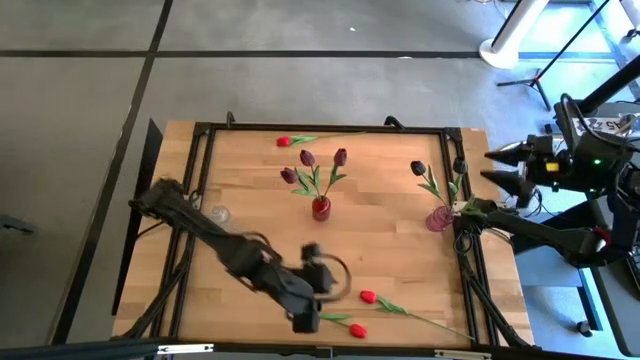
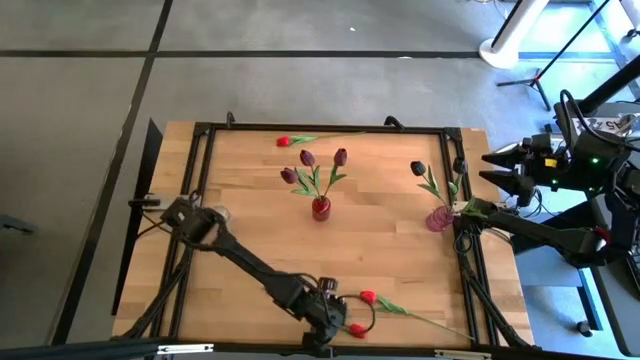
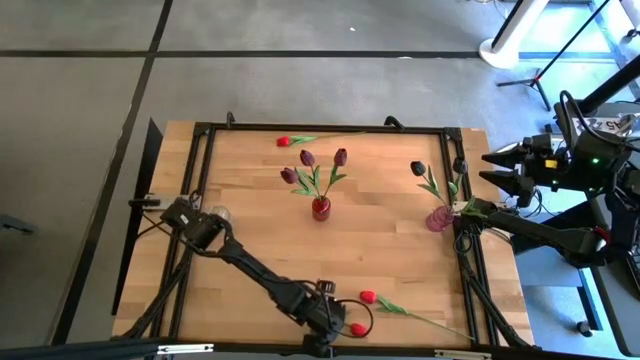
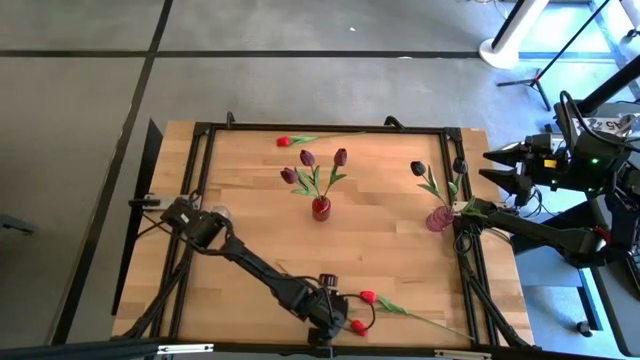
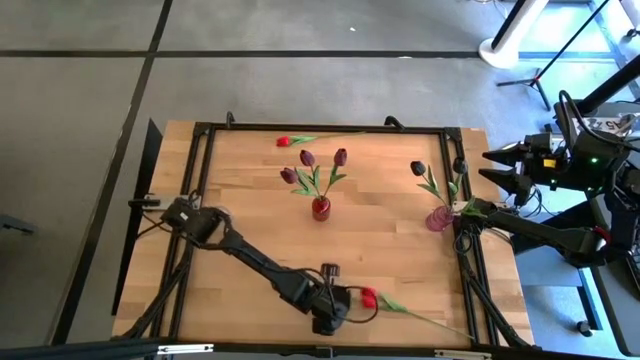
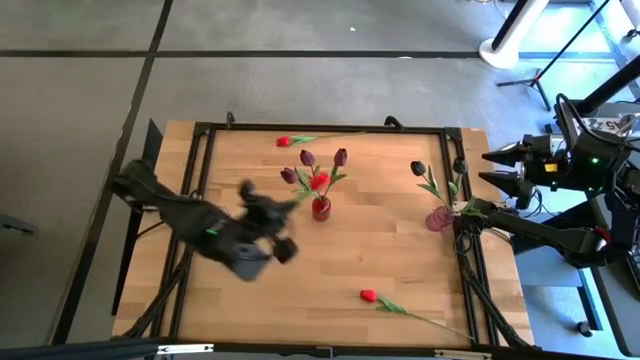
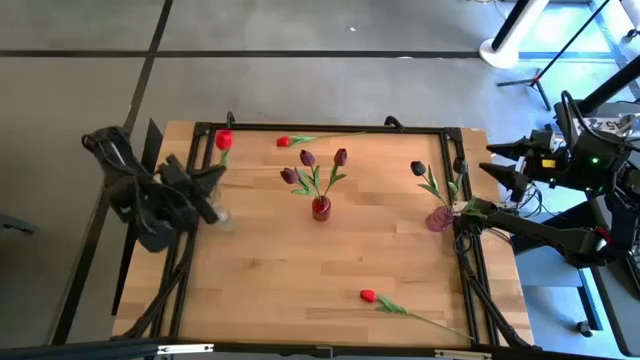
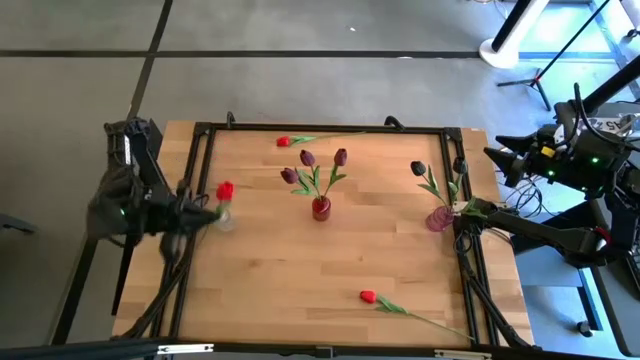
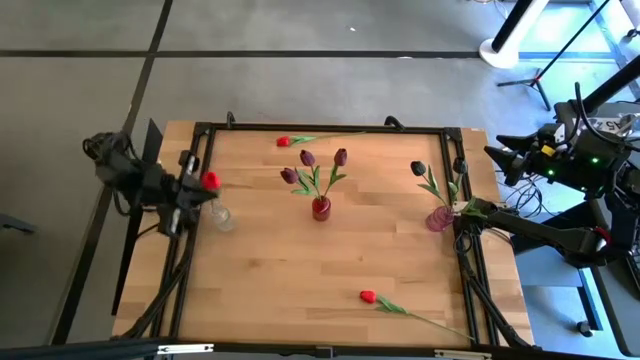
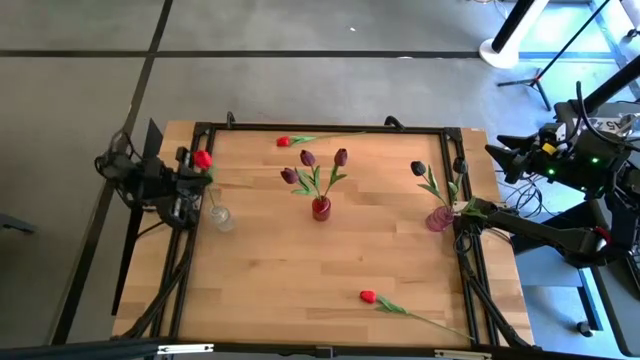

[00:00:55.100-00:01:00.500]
Task: Sort flowers into vase by color
Put the bottom left red tulip into the transparent vase

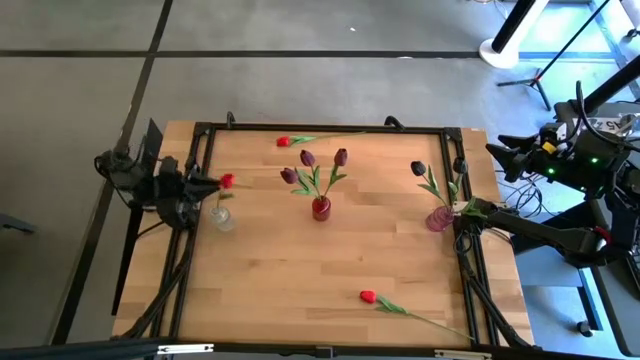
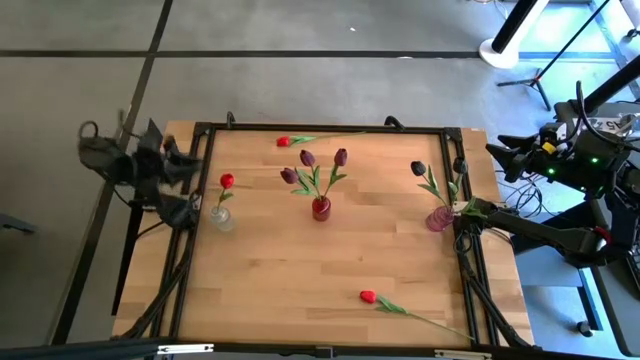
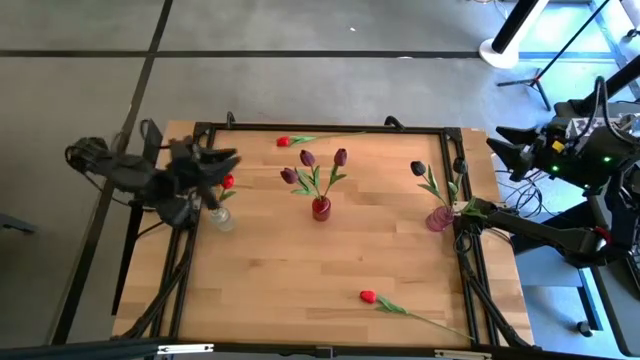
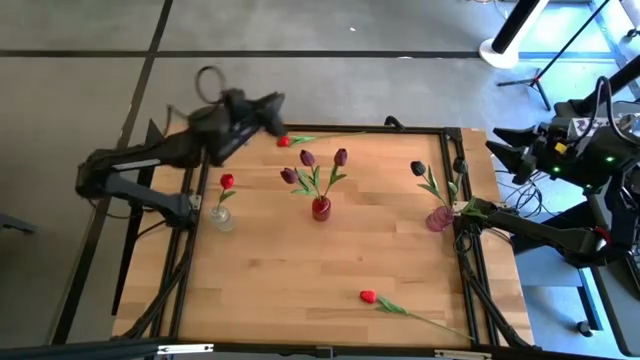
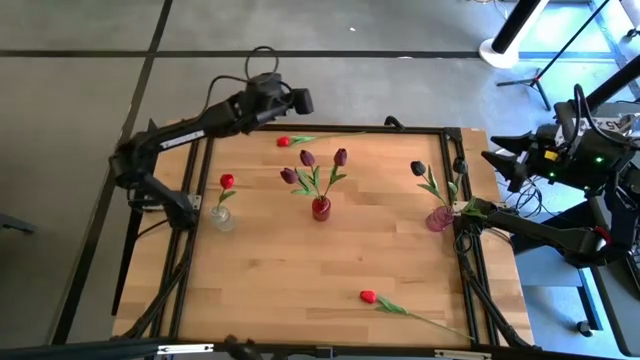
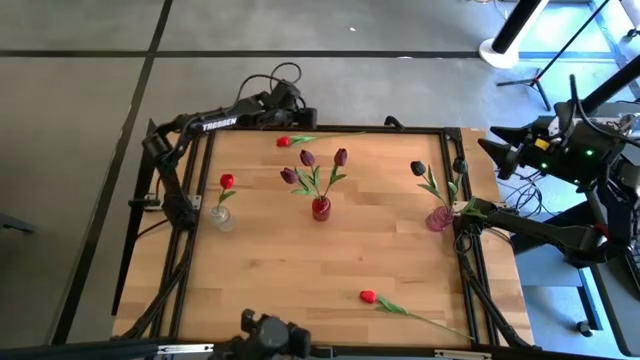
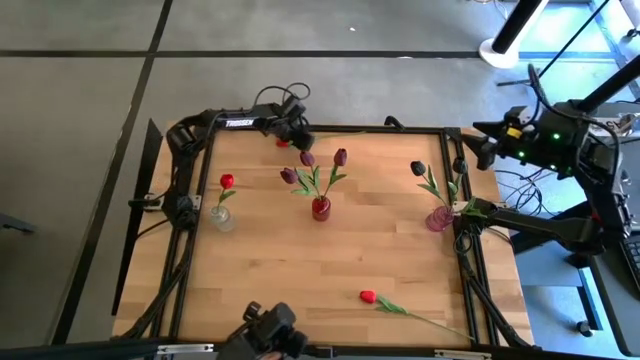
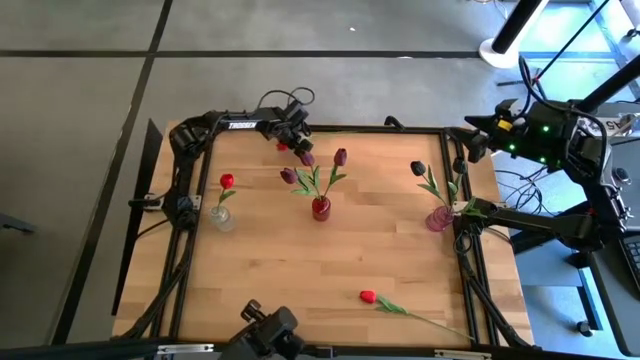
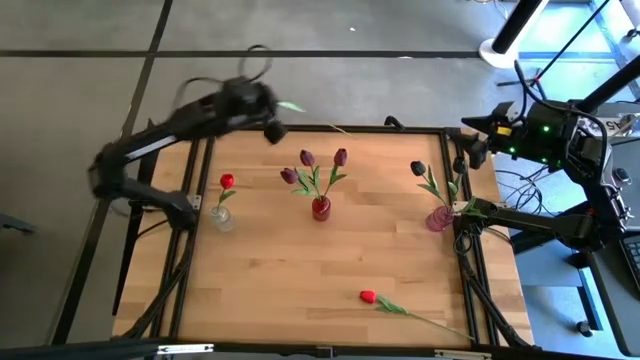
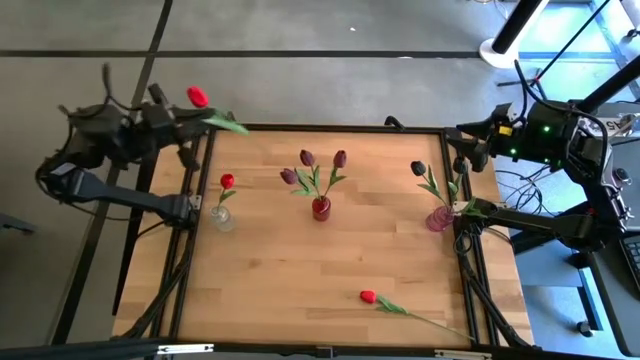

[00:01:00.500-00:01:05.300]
Put the top red tulip into the transparent vase

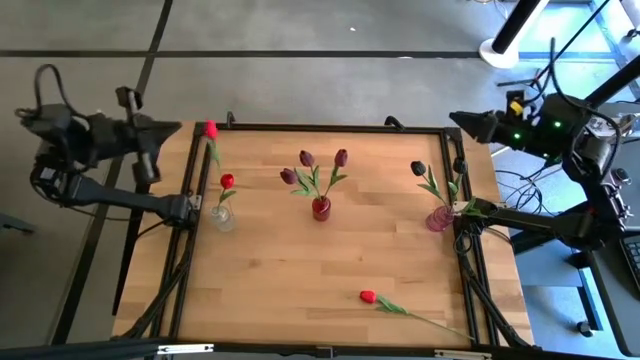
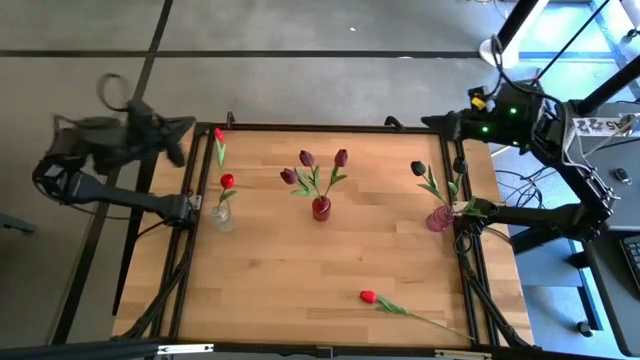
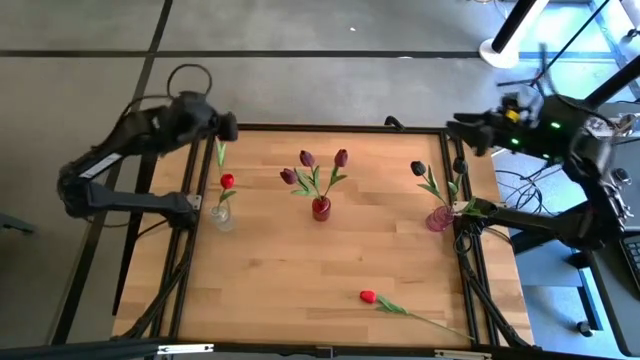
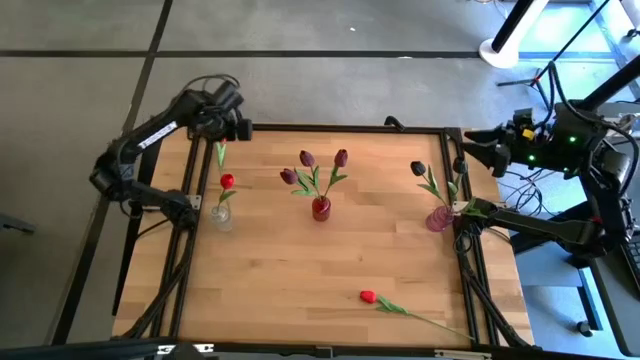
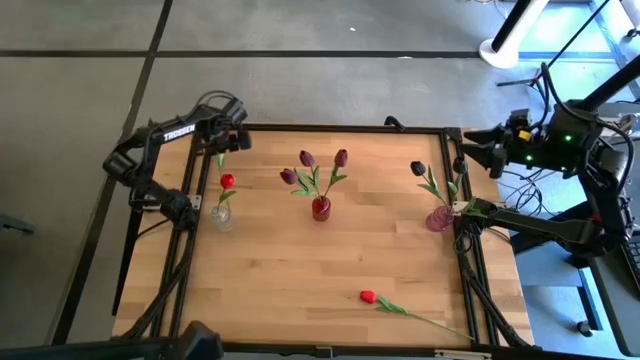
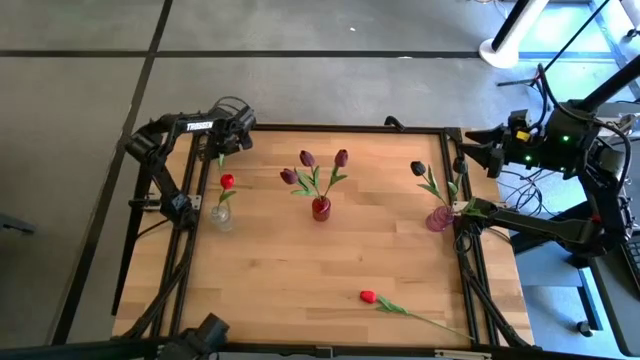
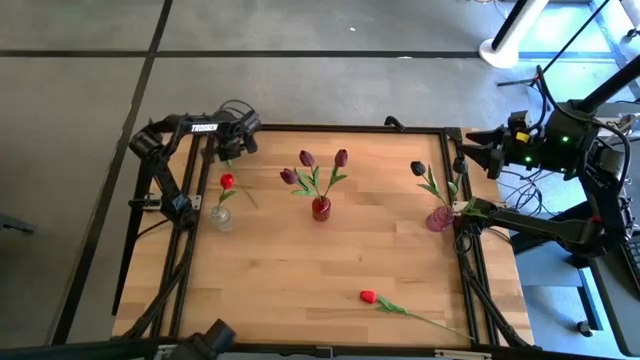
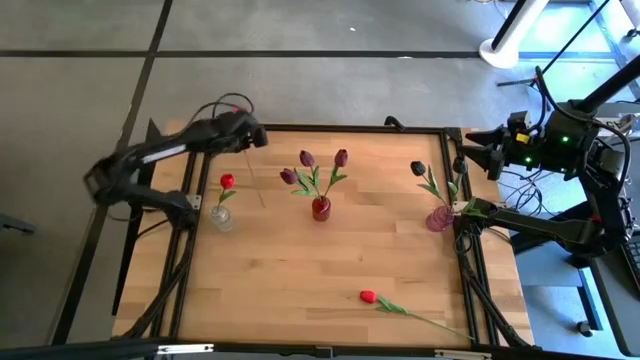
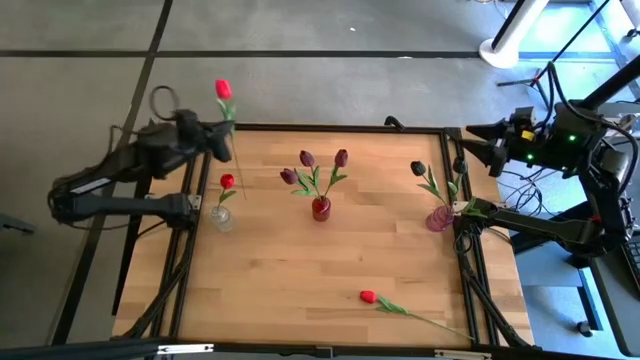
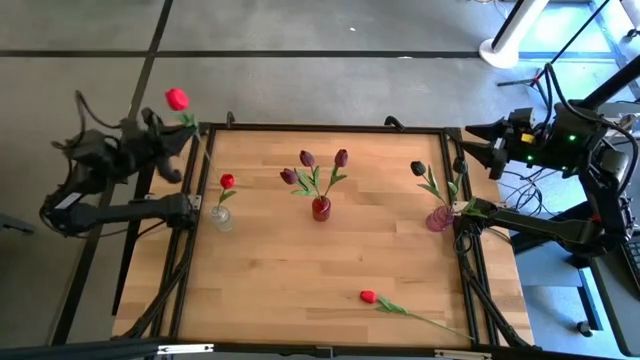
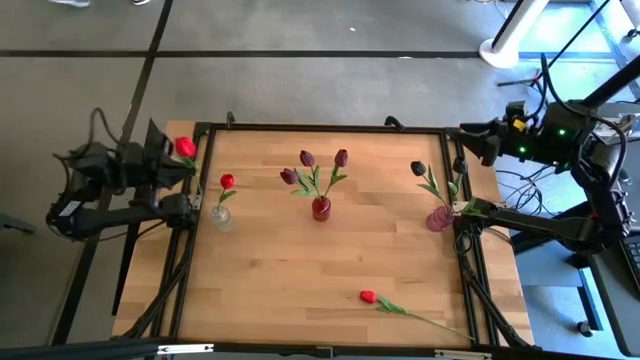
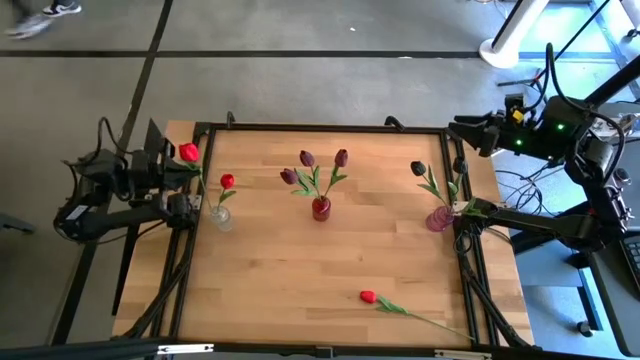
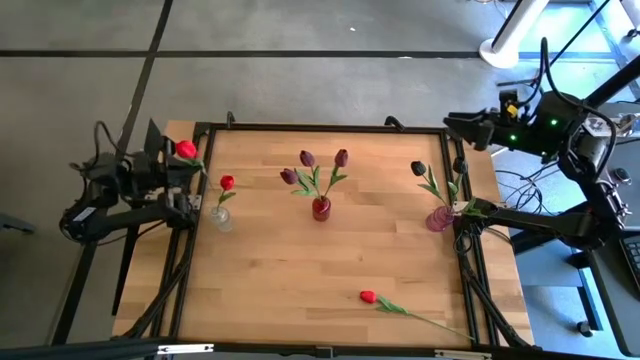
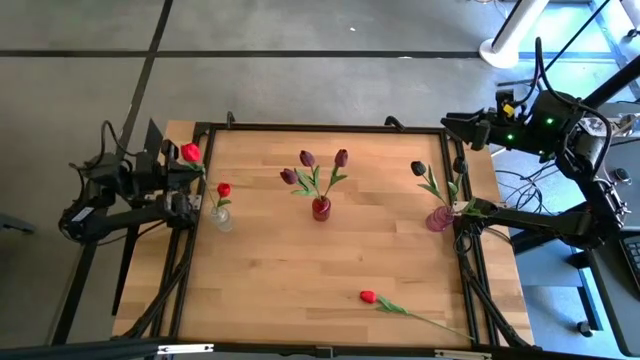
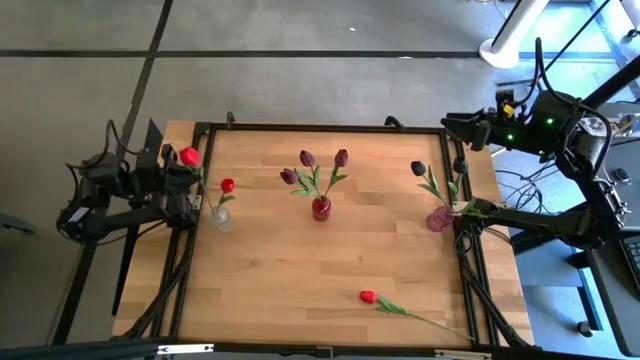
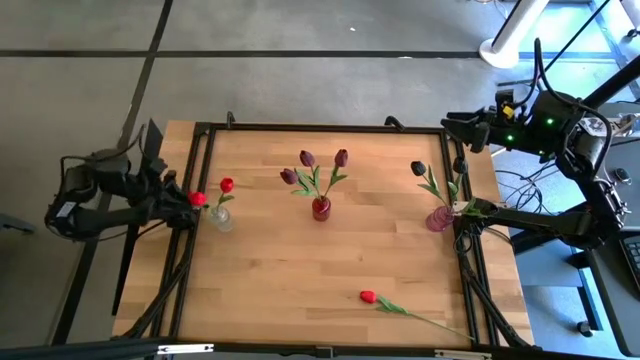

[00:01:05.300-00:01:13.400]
Put the top red tulip into the transparent vase

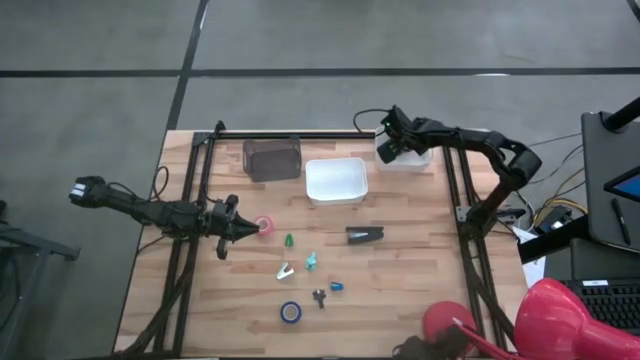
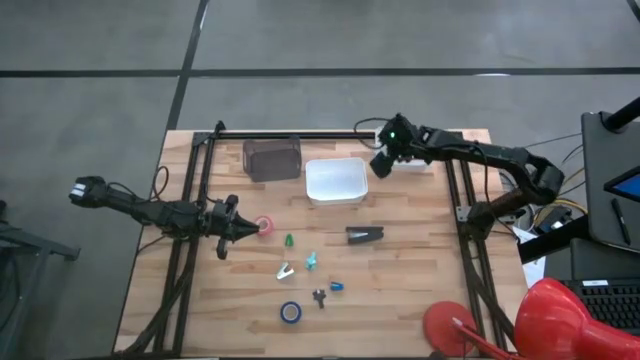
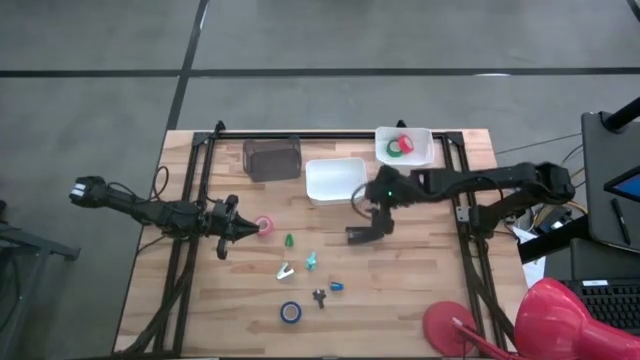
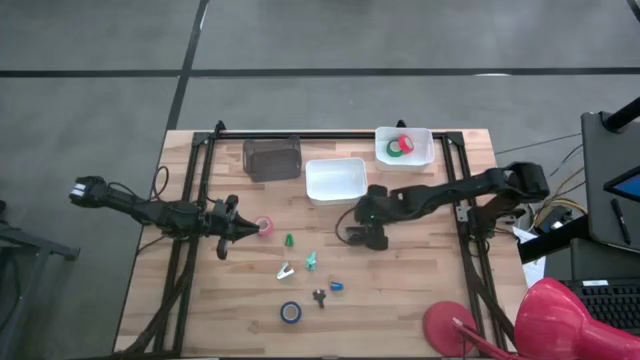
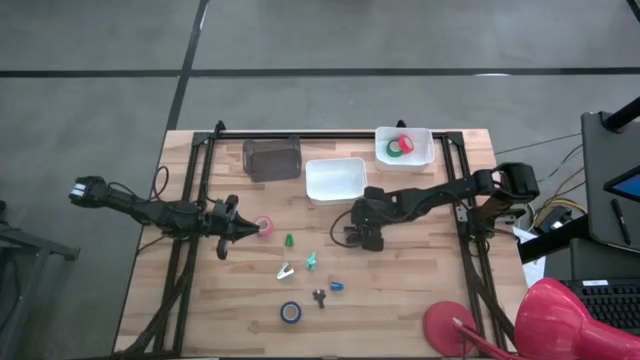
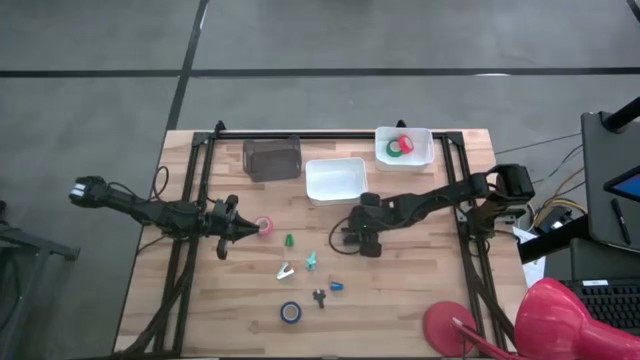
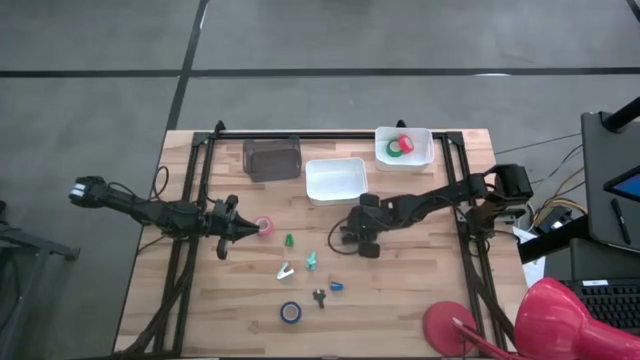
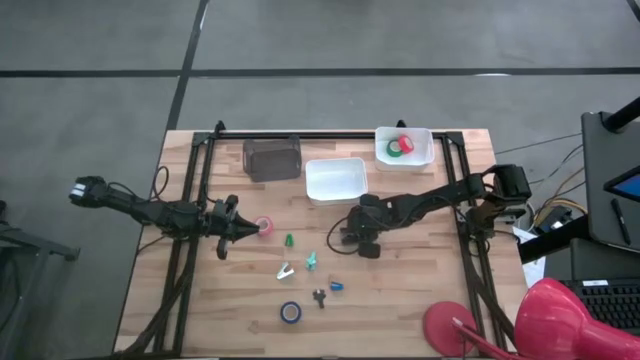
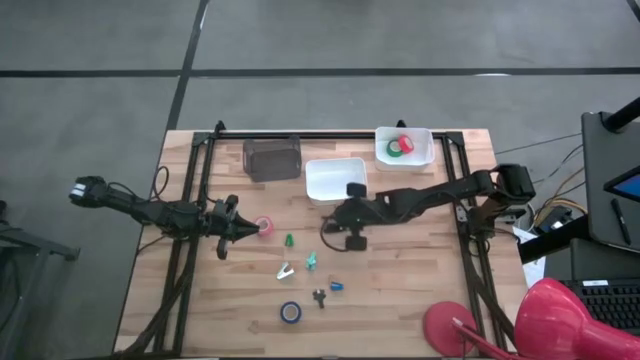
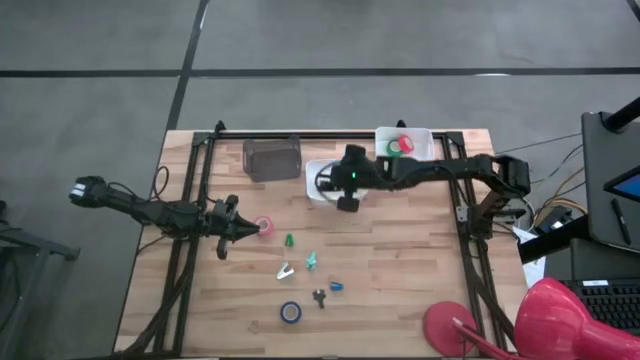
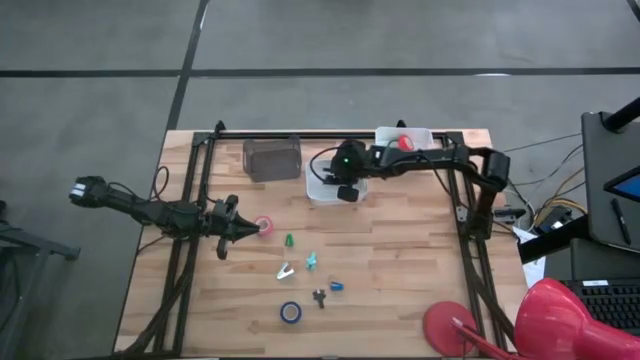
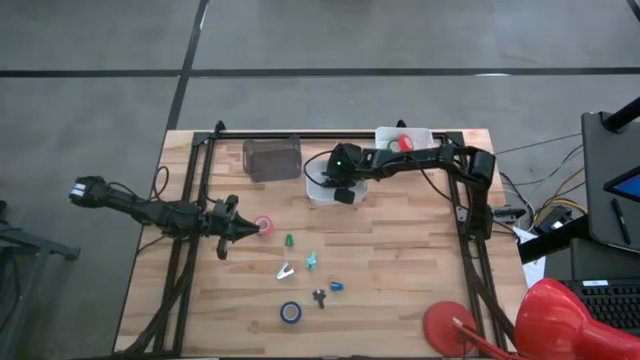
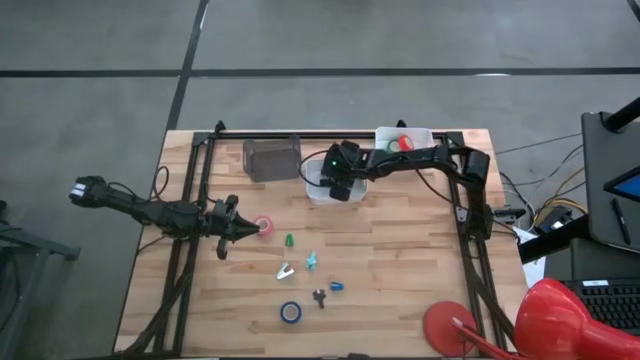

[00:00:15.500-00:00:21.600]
Task: Pick and place Stapler, Stapler remover, tape
Put the black stapler into the left white bin
